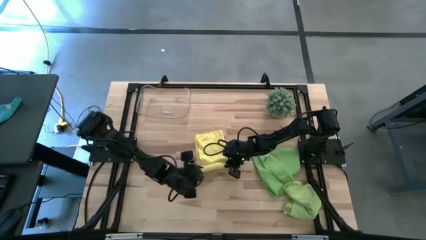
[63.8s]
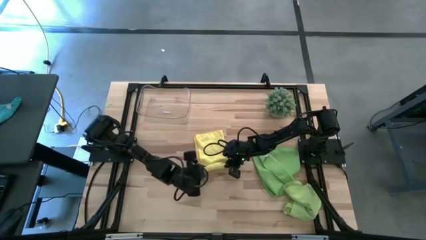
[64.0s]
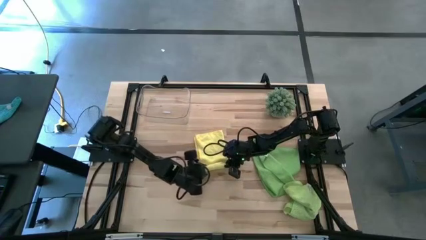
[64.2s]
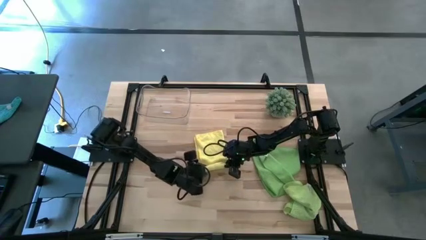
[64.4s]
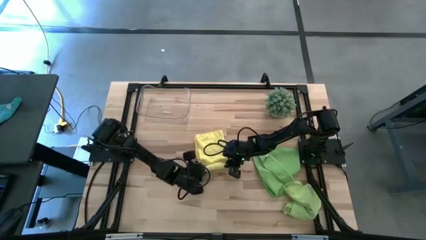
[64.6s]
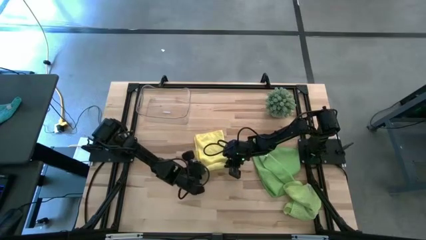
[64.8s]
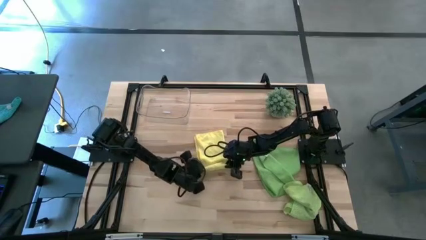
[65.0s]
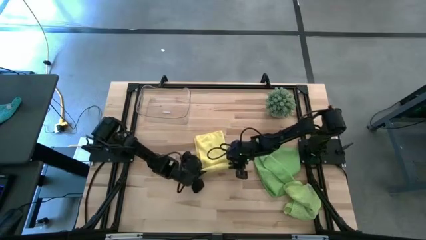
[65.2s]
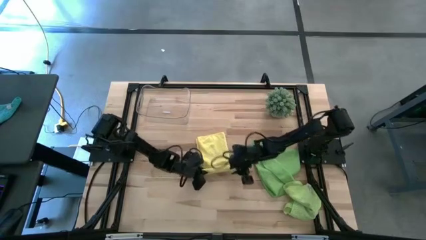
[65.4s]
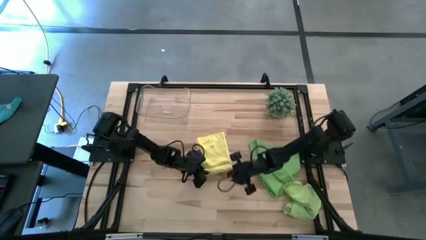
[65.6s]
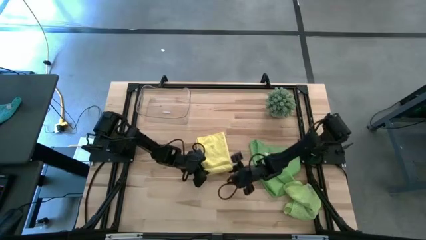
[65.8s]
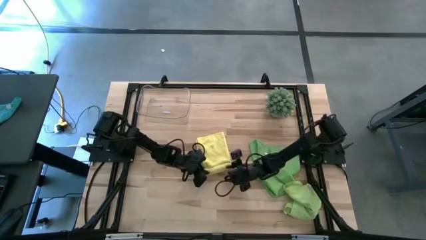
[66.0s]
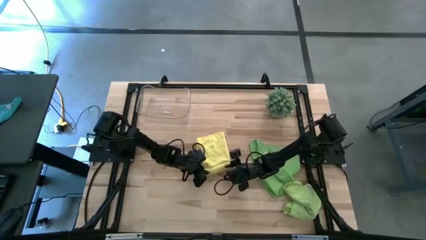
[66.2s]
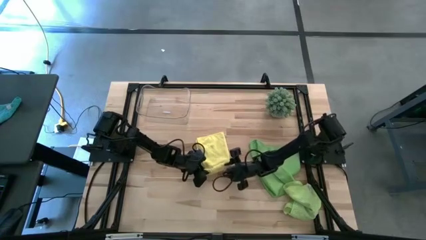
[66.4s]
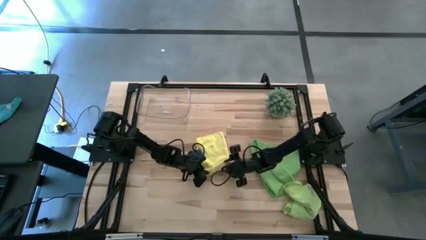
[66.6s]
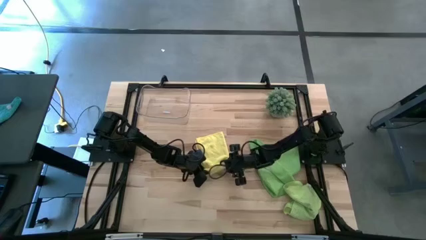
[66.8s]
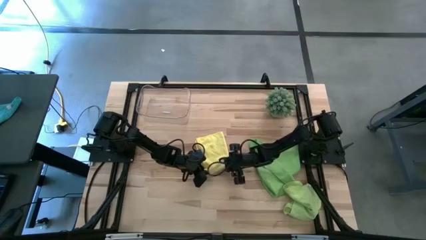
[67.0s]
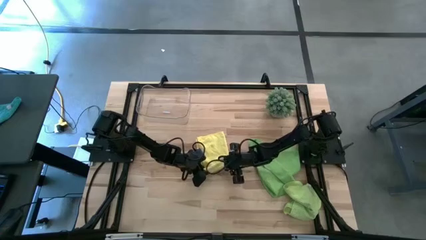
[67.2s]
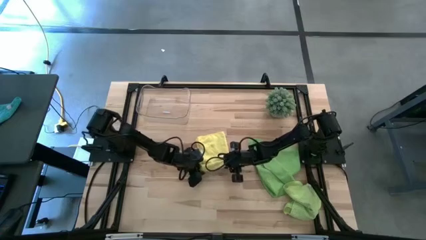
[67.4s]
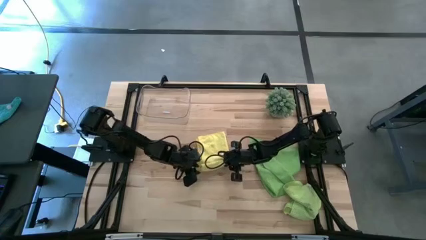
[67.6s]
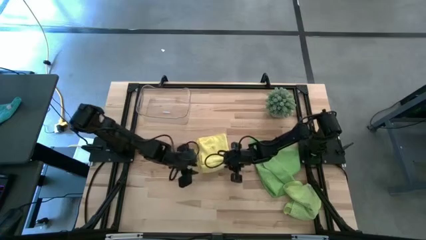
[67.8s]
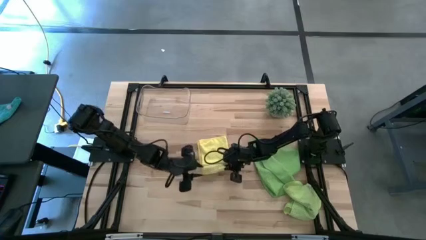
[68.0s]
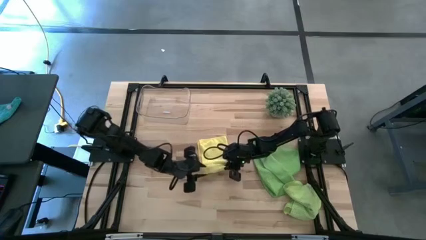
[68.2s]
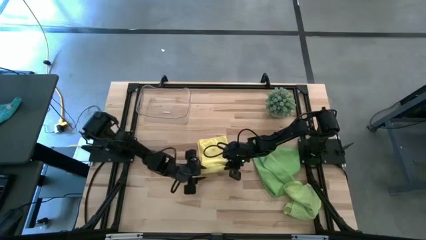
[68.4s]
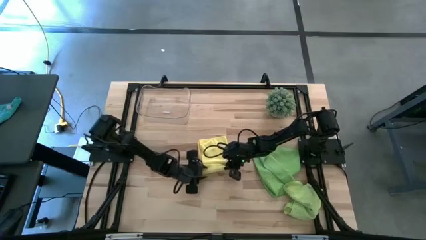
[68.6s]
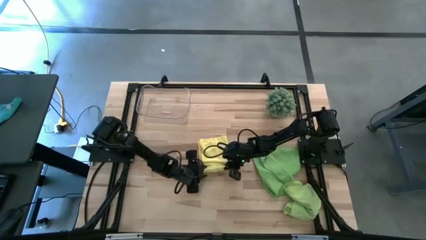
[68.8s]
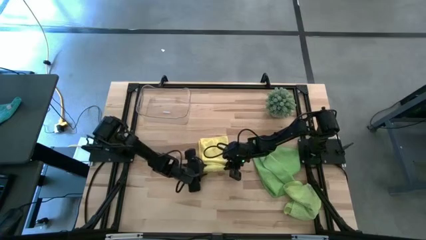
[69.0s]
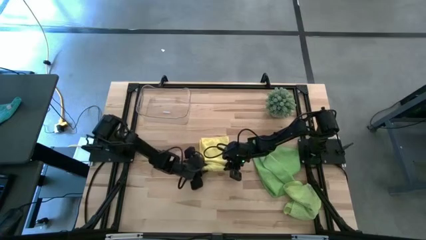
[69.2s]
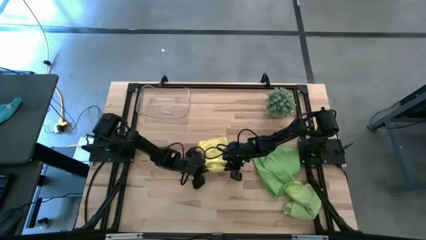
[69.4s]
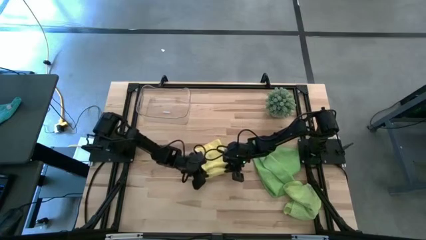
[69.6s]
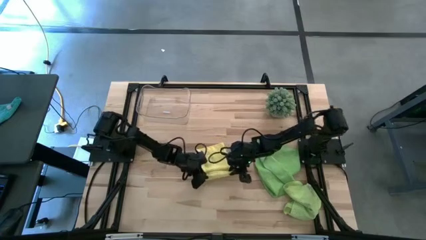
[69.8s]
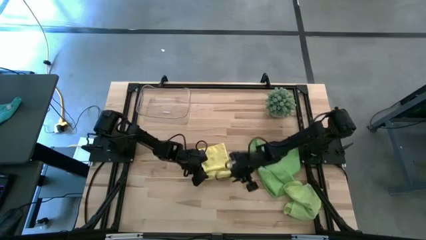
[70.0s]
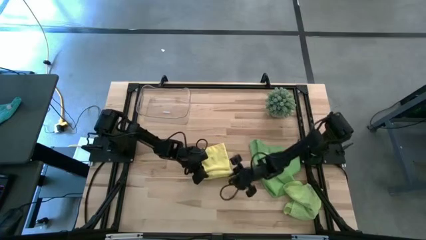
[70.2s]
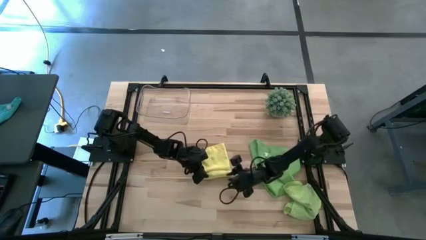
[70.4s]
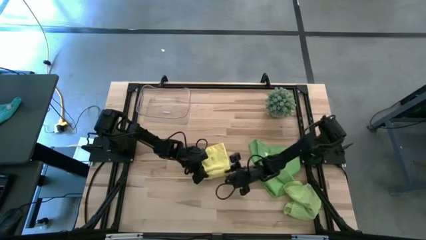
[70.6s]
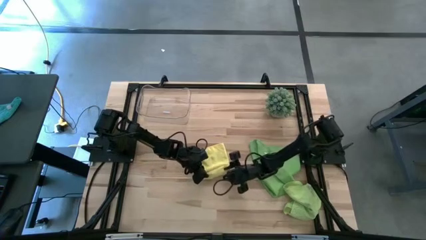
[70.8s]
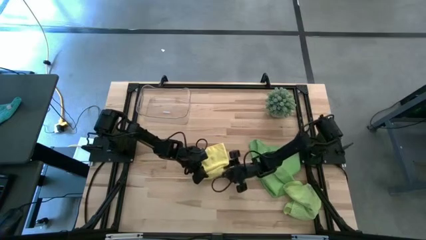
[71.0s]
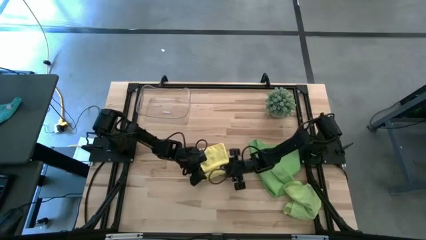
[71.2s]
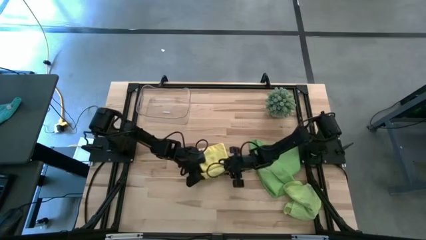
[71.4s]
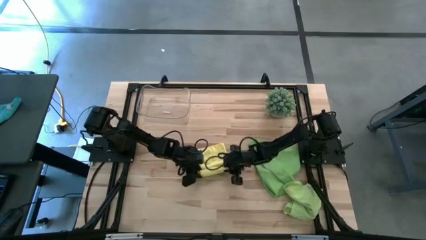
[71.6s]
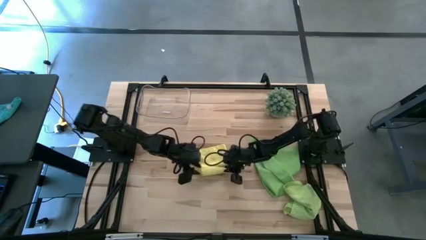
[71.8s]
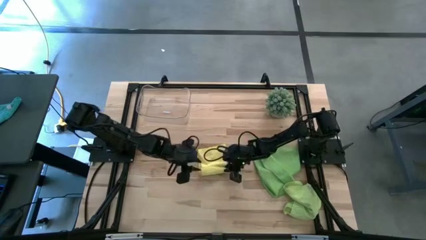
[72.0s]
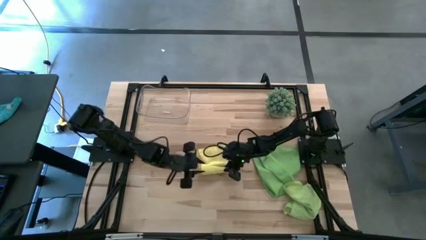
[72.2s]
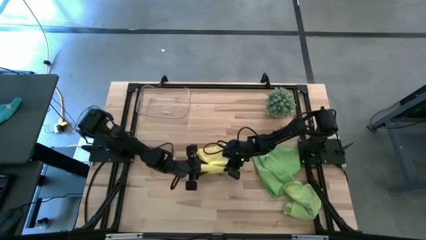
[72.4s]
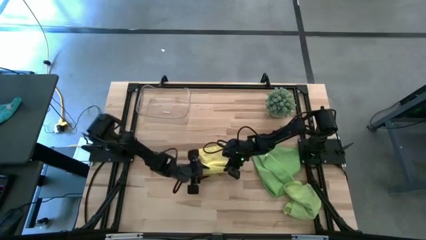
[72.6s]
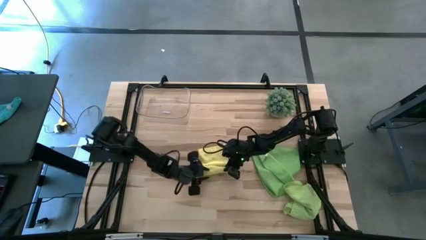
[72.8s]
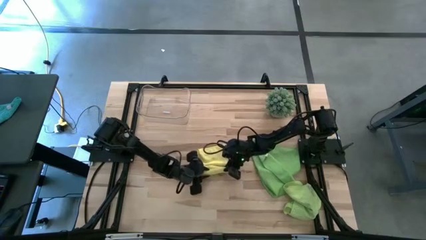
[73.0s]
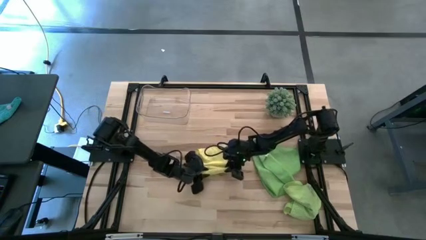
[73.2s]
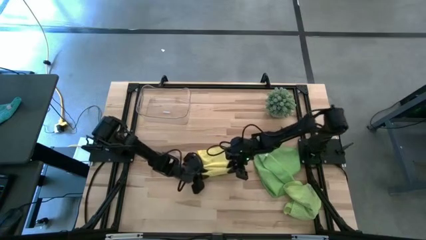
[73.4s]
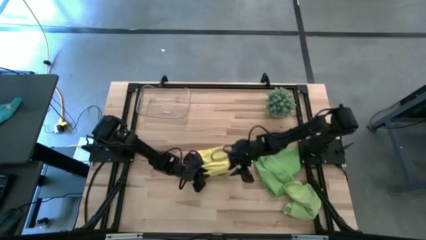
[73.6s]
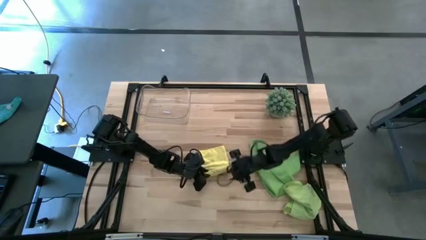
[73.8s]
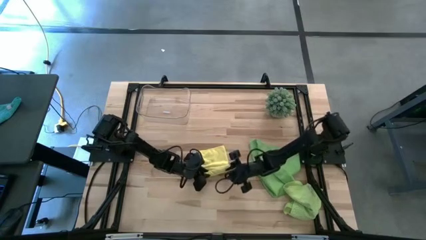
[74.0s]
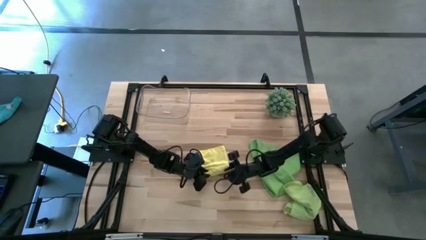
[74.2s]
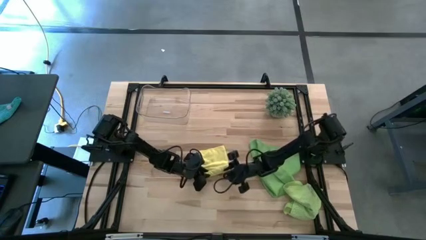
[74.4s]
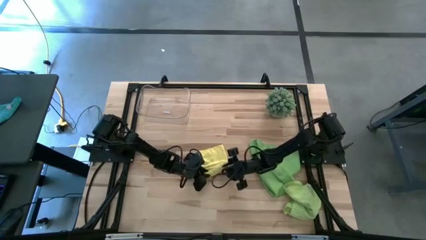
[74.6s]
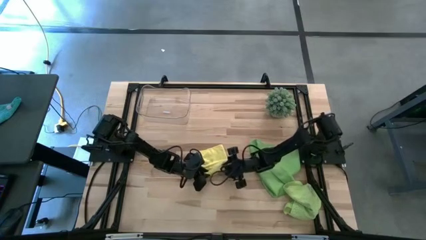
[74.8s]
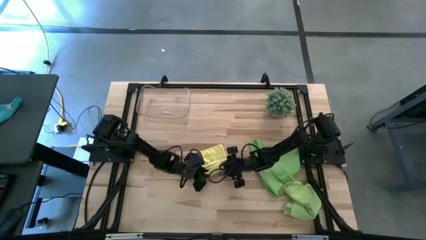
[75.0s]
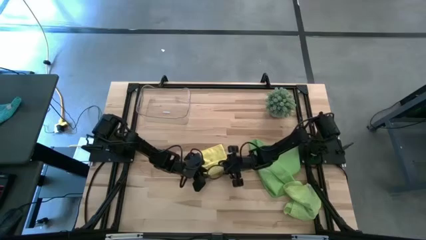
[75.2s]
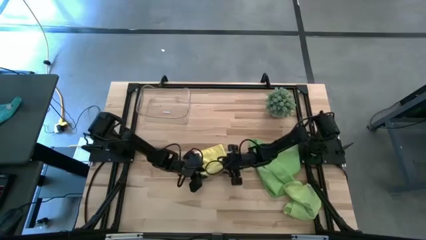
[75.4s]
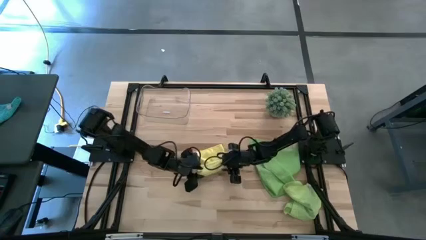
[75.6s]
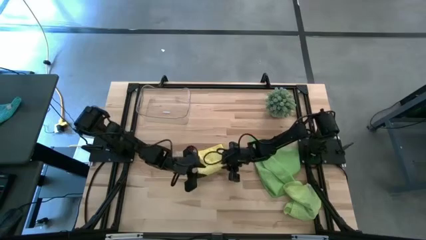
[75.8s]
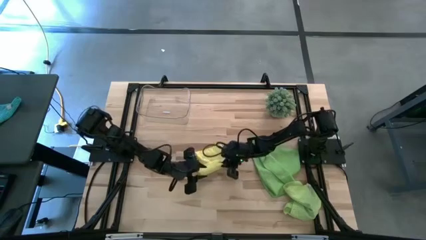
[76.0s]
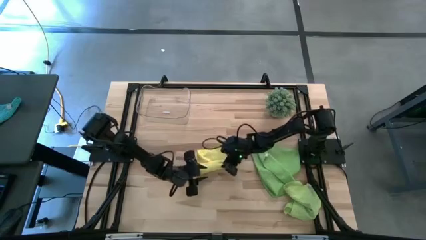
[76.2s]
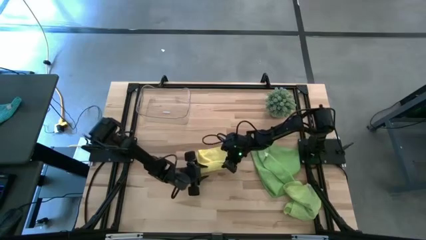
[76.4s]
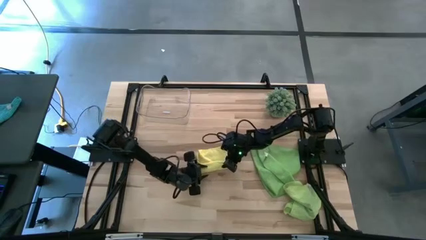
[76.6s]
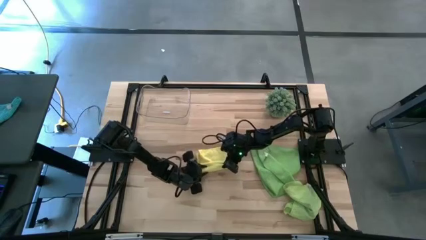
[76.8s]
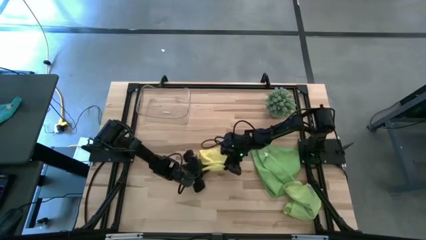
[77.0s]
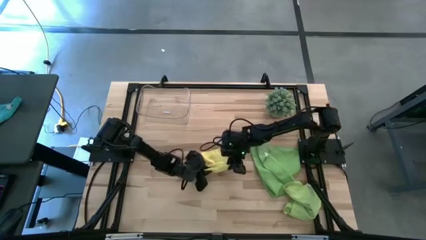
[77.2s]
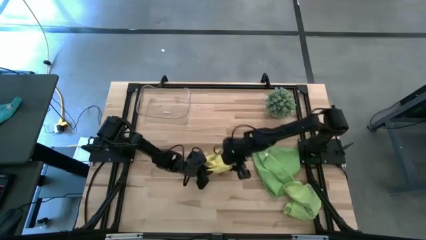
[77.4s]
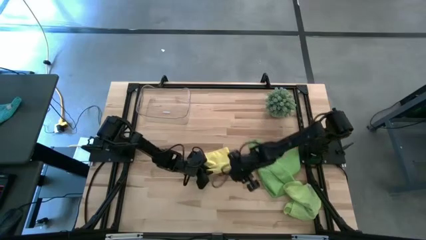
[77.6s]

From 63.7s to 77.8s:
Task: Roll microfiber towels into tight, uniform cylinder then place into a basket
Roll the yellow microfiber cloth

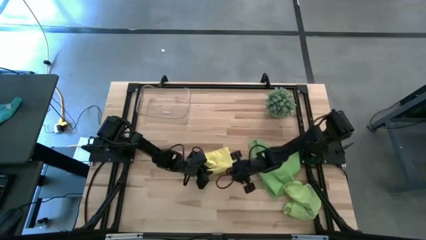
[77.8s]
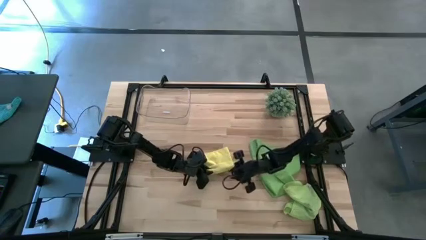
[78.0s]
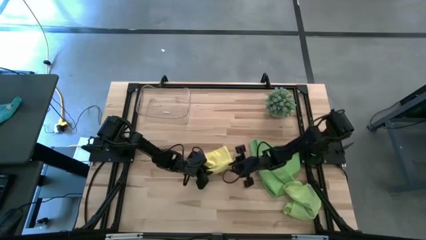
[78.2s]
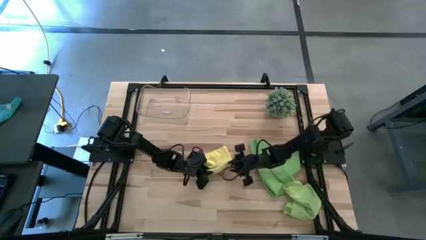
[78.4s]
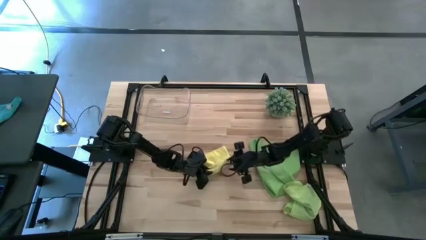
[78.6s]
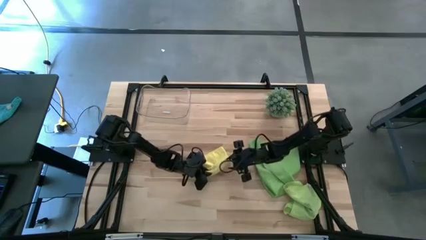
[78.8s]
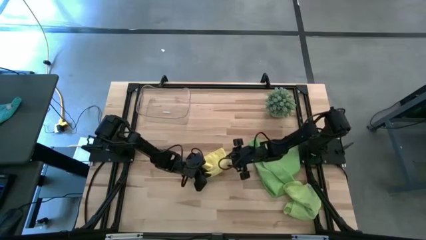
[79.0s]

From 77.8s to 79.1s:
Roll the yellow microfiber cloth

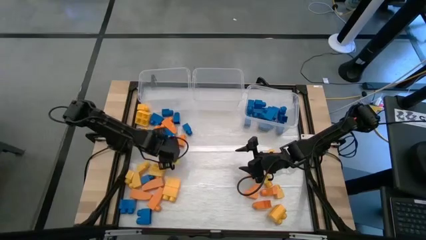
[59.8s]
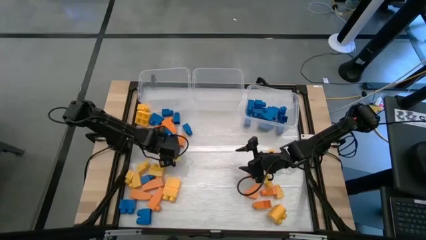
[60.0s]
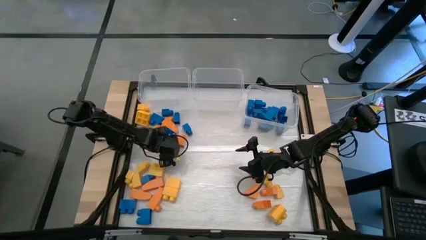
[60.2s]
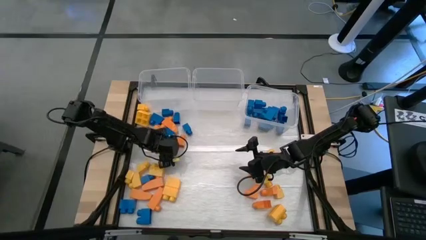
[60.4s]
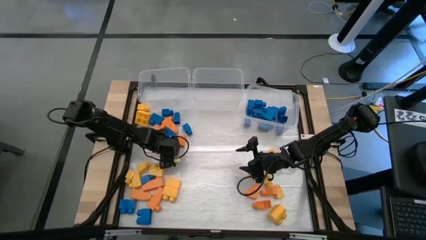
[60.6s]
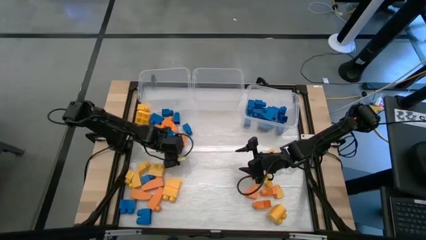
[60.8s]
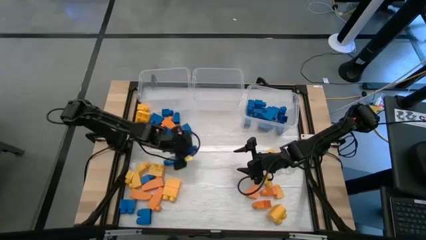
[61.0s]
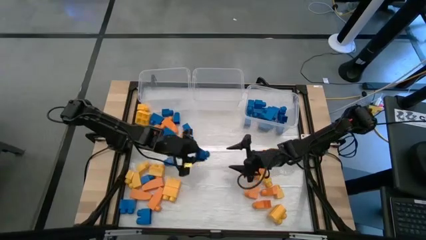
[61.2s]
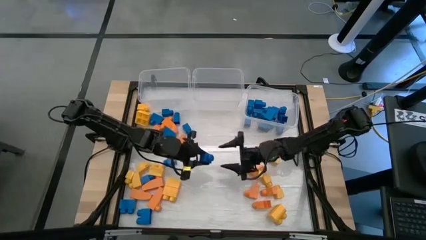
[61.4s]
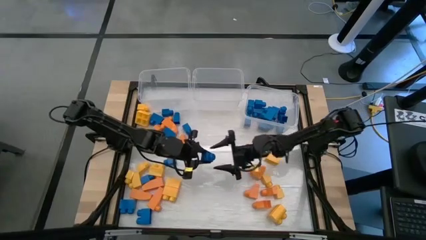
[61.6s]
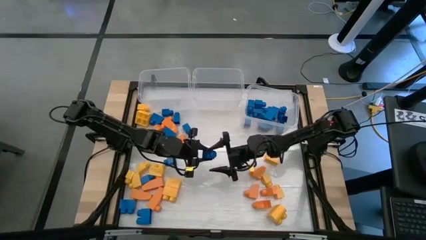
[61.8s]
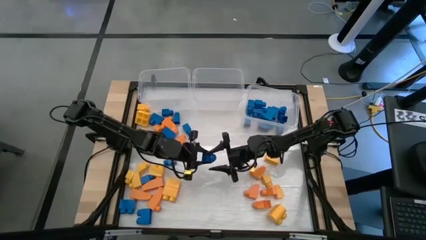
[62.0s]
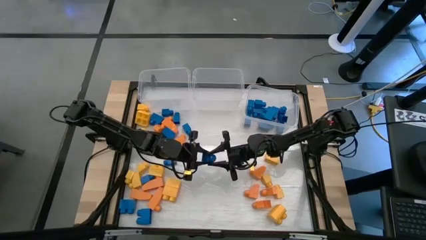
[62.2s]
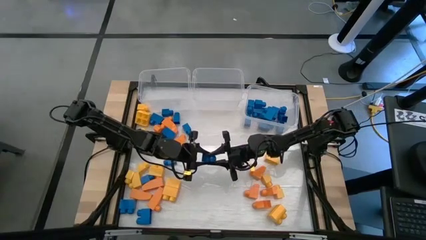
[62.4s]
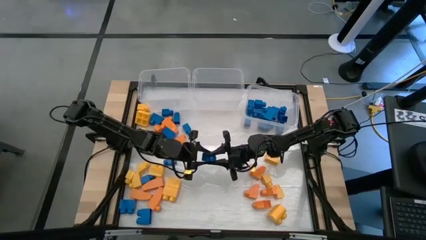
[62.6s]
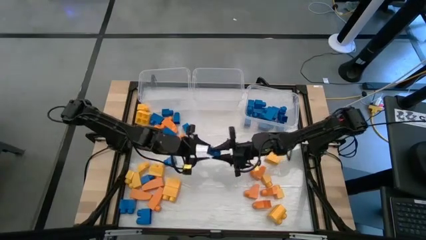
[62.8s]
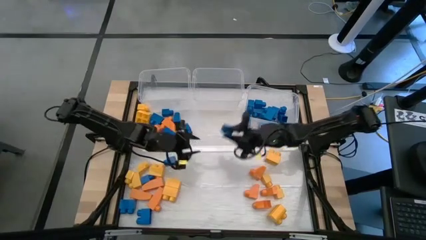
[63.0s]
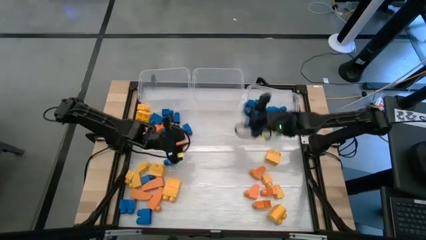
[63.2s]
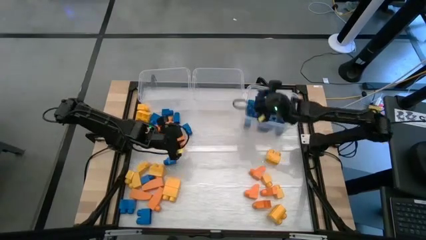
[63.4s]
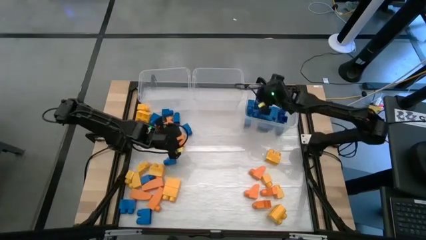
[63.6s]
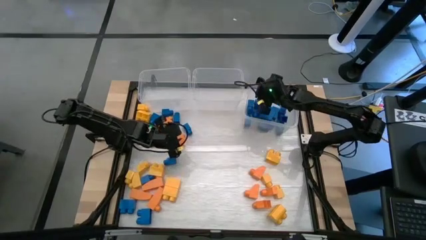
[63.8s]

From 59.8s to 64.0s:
Task: Sort blocks
Put the blue game piece into the right transparent bin
